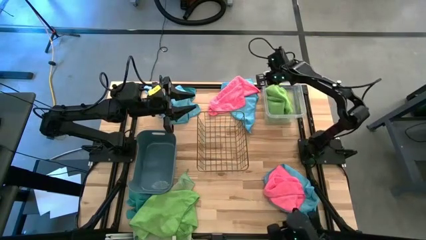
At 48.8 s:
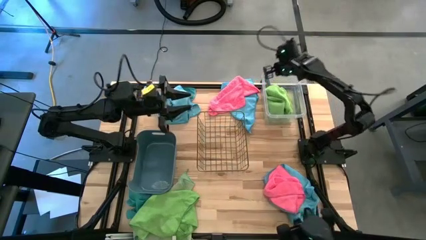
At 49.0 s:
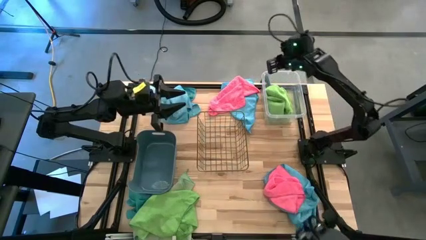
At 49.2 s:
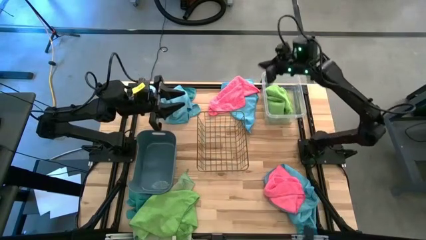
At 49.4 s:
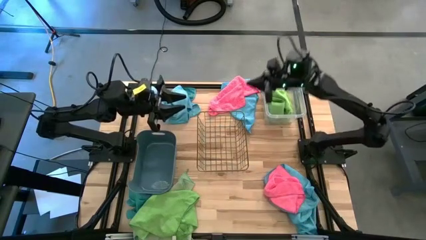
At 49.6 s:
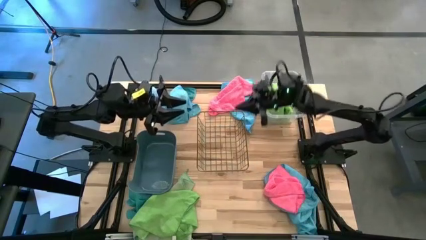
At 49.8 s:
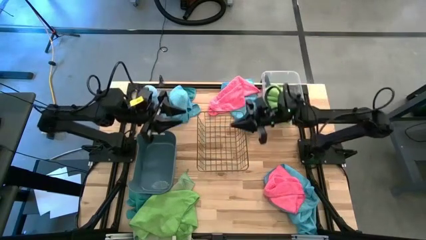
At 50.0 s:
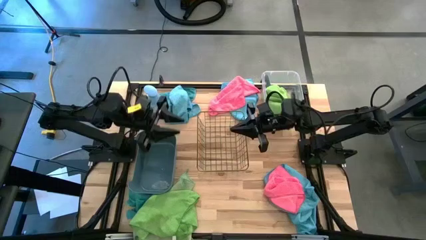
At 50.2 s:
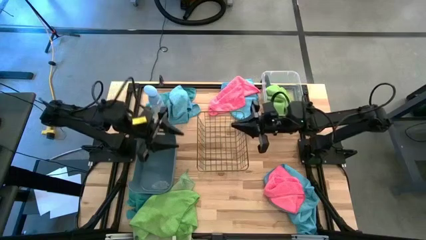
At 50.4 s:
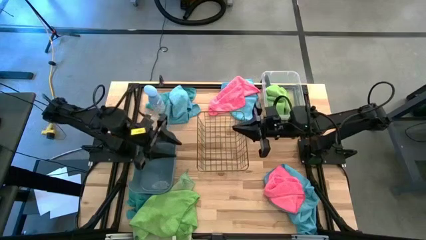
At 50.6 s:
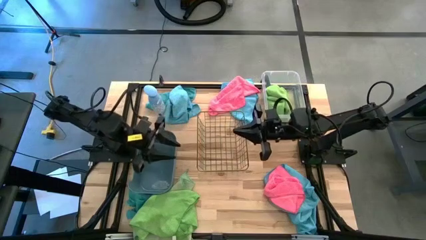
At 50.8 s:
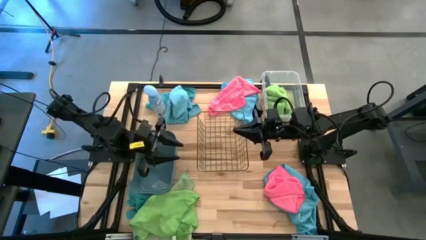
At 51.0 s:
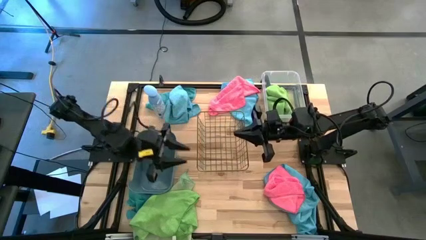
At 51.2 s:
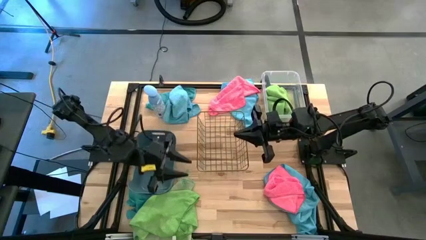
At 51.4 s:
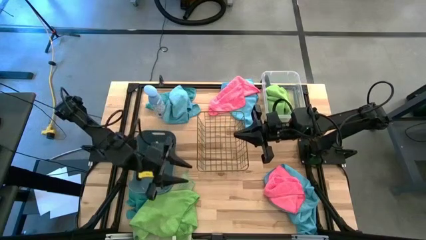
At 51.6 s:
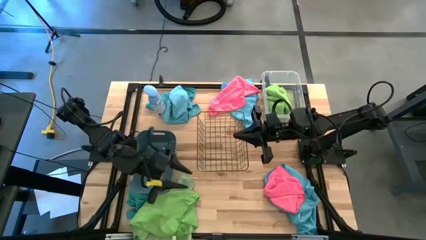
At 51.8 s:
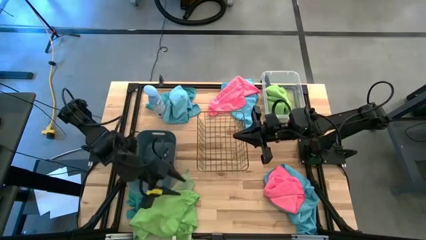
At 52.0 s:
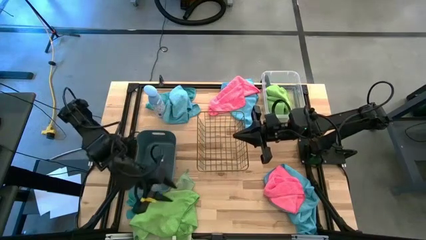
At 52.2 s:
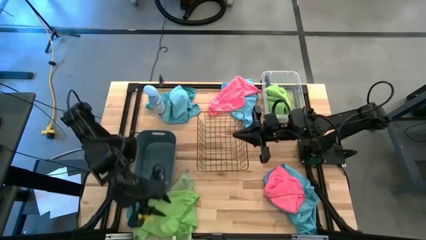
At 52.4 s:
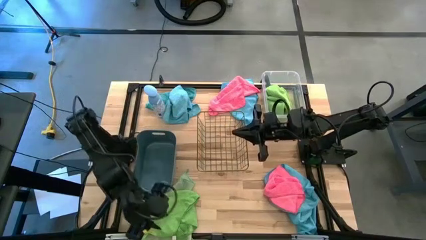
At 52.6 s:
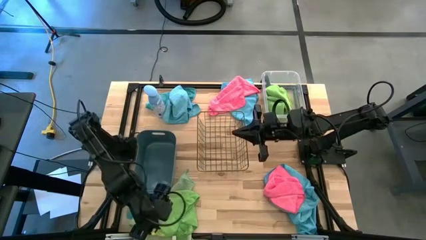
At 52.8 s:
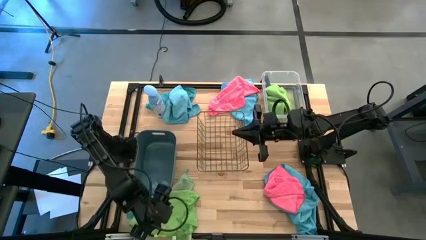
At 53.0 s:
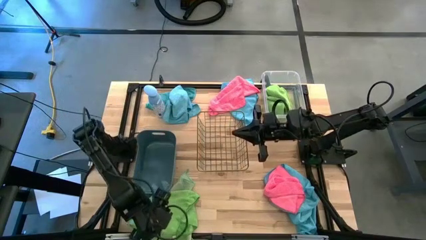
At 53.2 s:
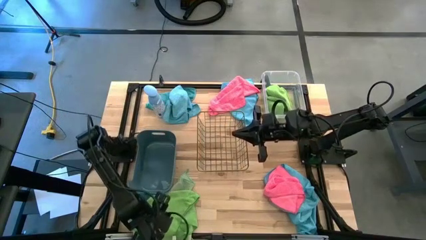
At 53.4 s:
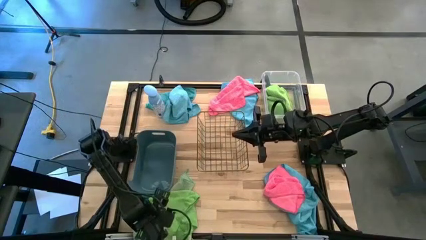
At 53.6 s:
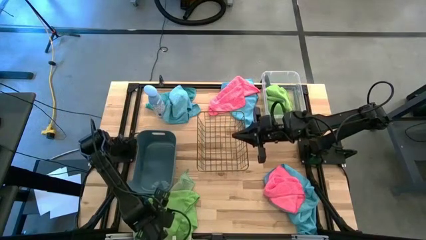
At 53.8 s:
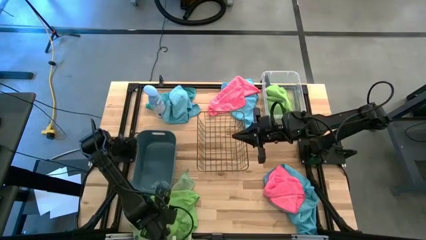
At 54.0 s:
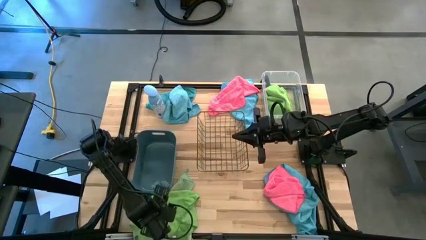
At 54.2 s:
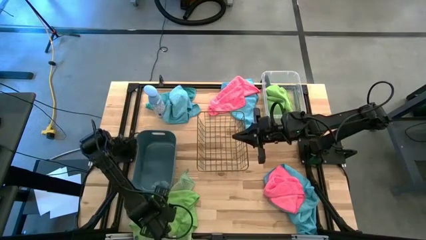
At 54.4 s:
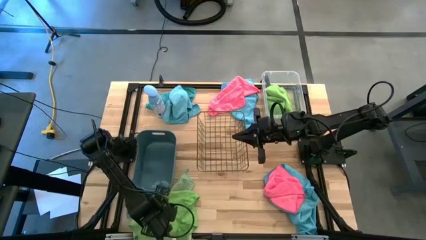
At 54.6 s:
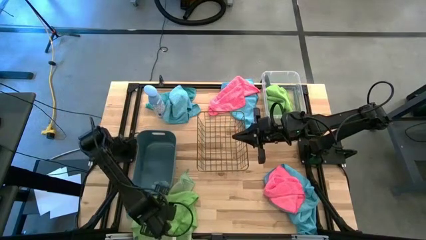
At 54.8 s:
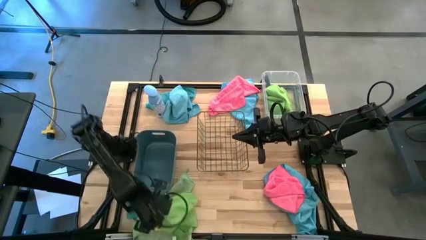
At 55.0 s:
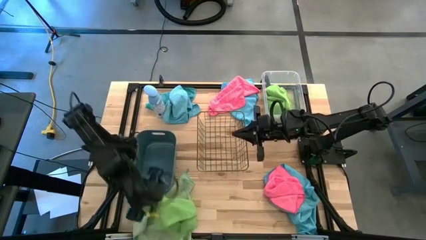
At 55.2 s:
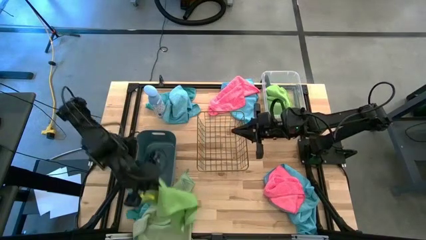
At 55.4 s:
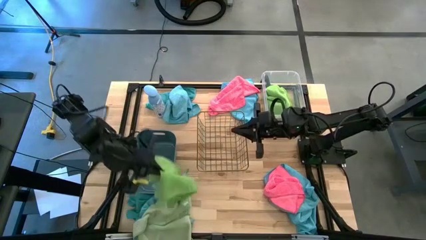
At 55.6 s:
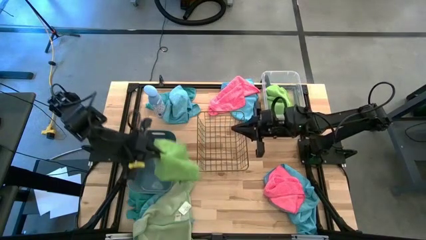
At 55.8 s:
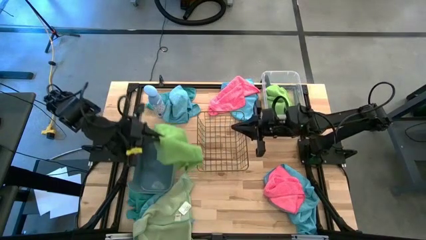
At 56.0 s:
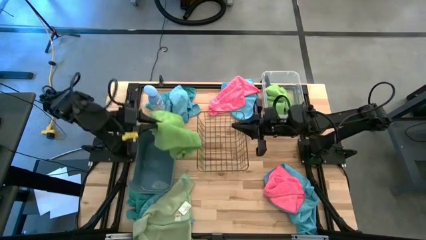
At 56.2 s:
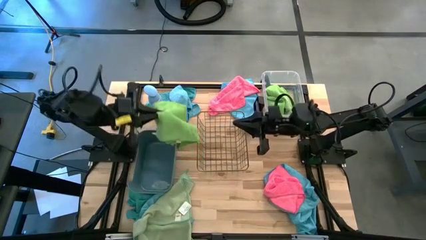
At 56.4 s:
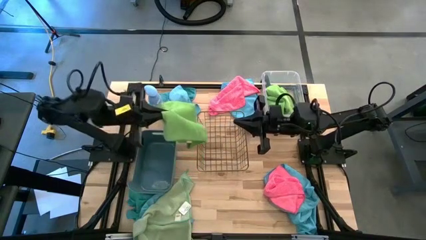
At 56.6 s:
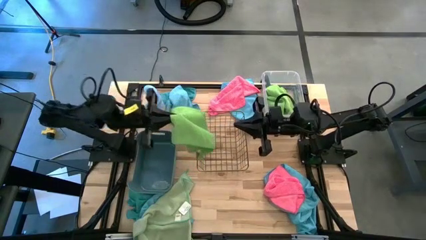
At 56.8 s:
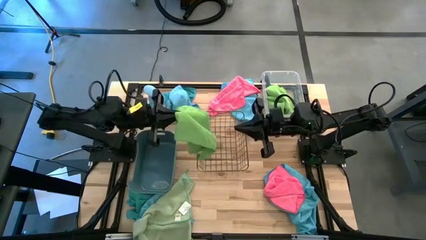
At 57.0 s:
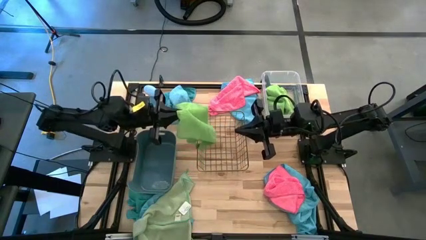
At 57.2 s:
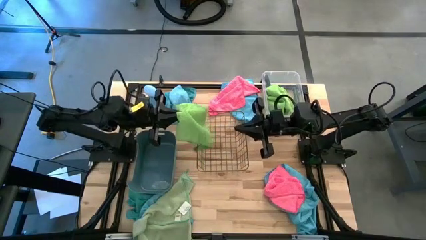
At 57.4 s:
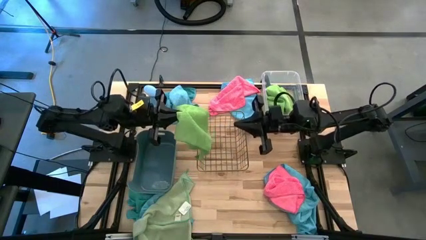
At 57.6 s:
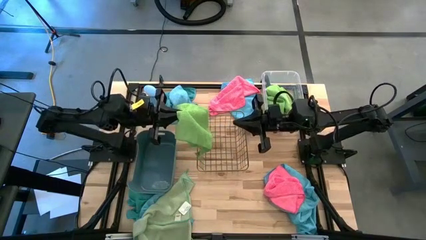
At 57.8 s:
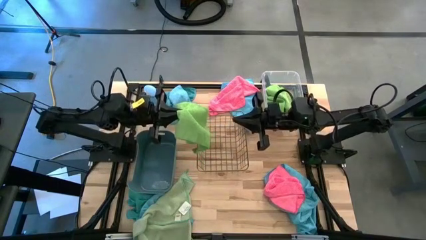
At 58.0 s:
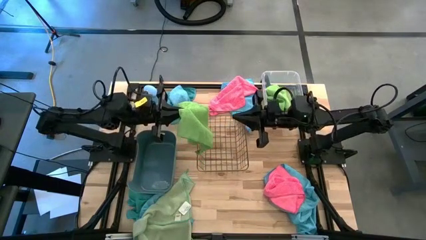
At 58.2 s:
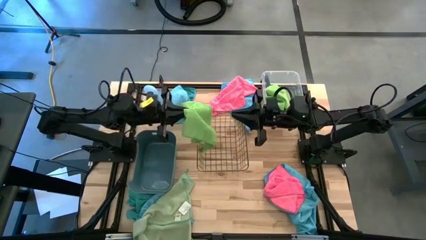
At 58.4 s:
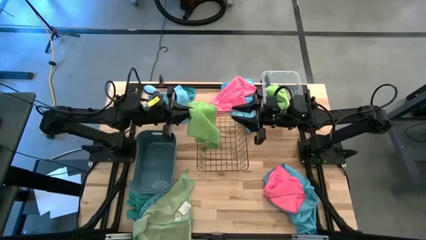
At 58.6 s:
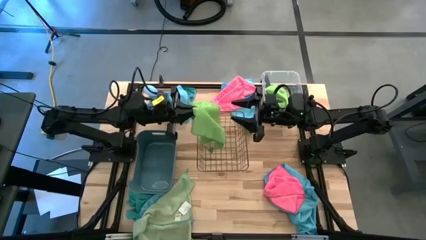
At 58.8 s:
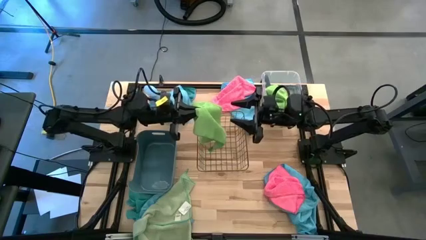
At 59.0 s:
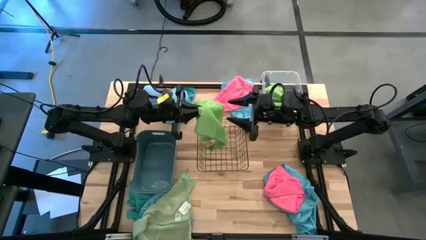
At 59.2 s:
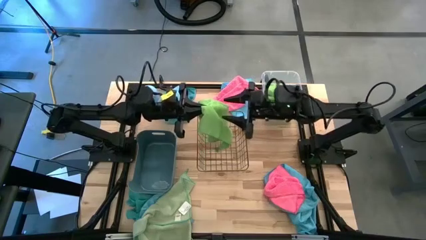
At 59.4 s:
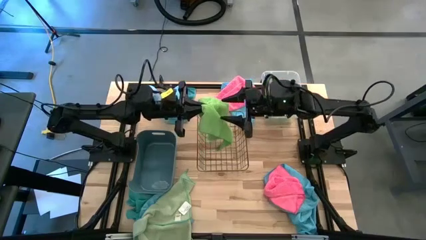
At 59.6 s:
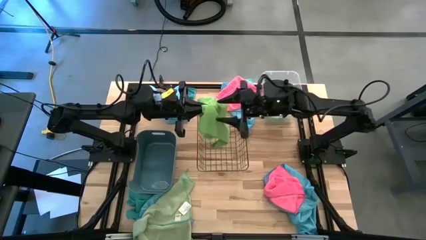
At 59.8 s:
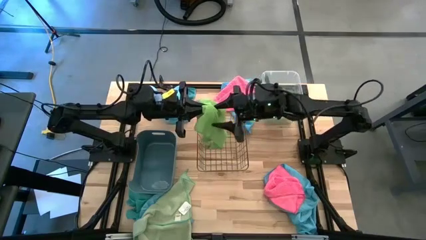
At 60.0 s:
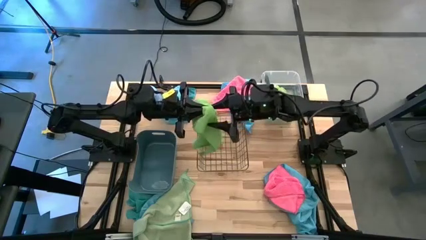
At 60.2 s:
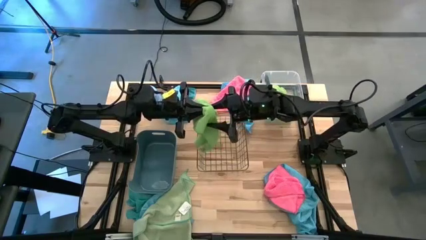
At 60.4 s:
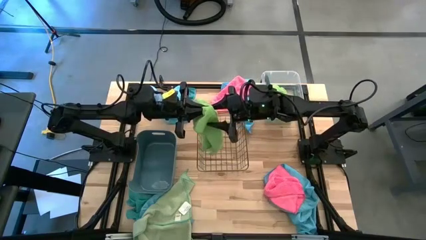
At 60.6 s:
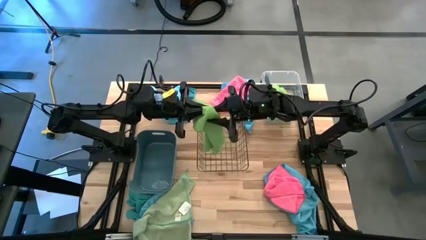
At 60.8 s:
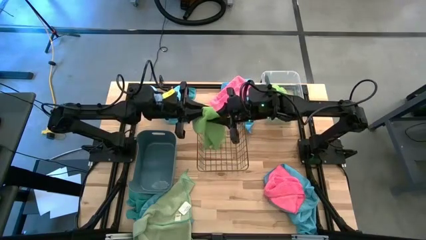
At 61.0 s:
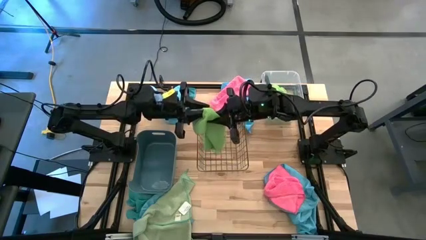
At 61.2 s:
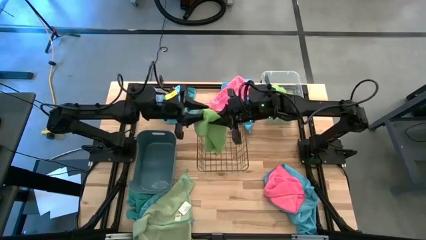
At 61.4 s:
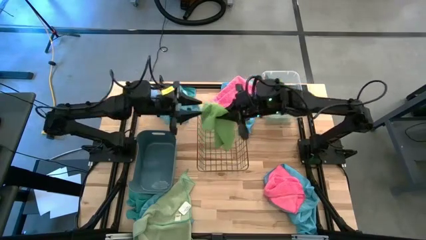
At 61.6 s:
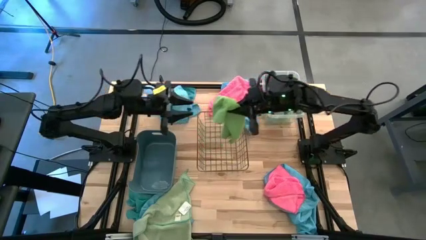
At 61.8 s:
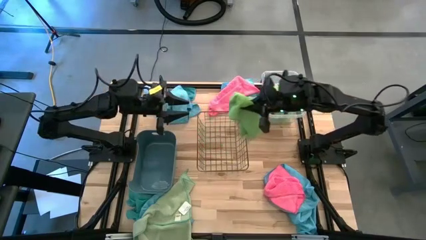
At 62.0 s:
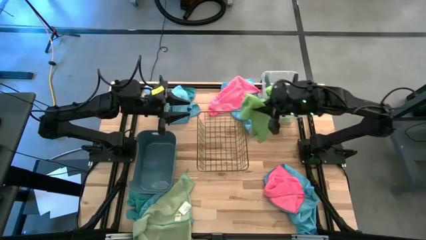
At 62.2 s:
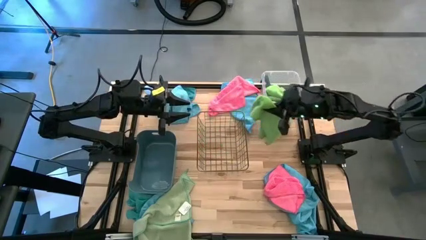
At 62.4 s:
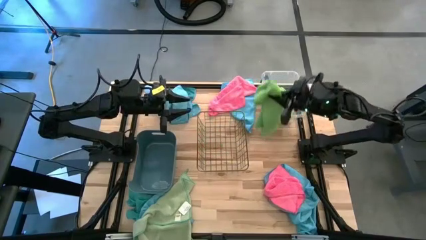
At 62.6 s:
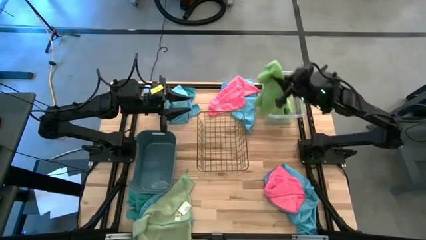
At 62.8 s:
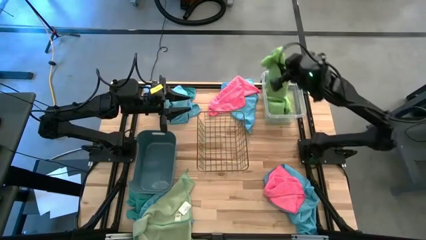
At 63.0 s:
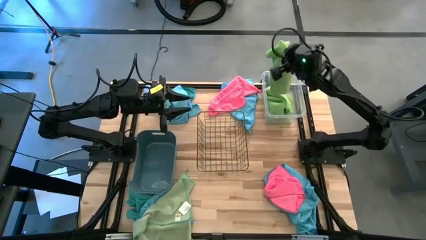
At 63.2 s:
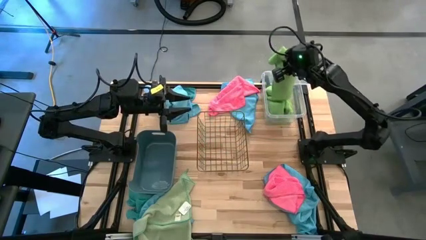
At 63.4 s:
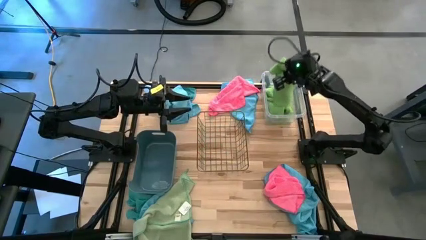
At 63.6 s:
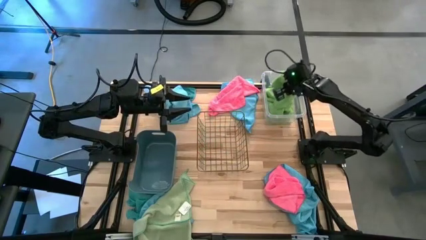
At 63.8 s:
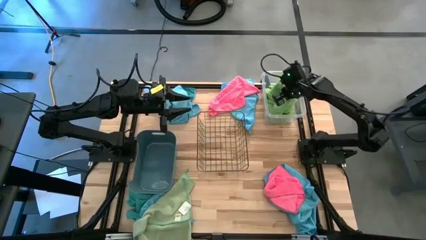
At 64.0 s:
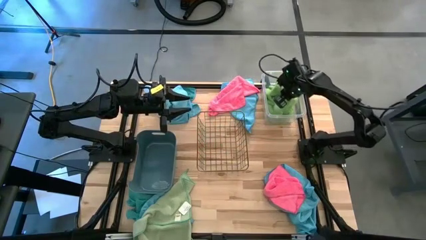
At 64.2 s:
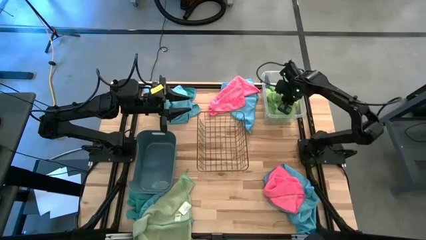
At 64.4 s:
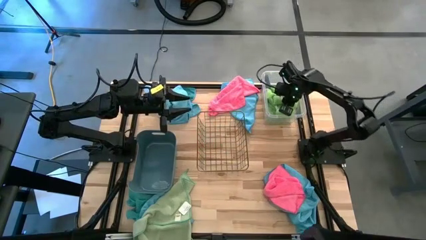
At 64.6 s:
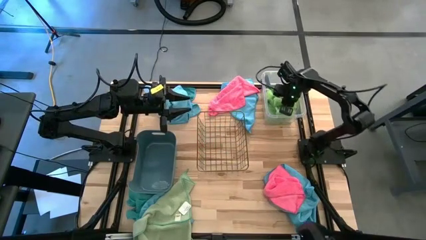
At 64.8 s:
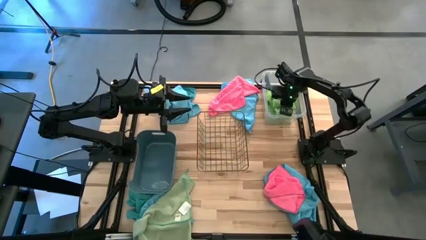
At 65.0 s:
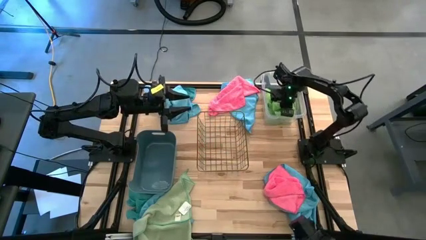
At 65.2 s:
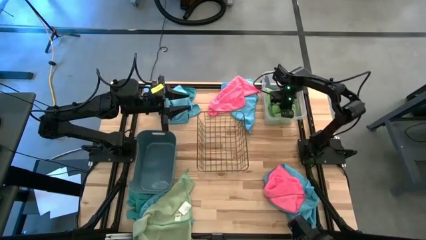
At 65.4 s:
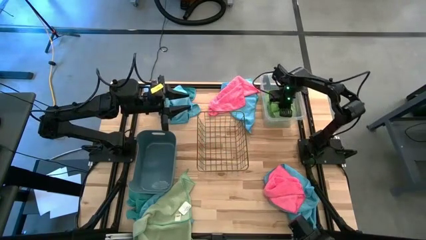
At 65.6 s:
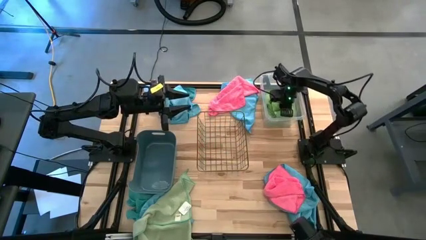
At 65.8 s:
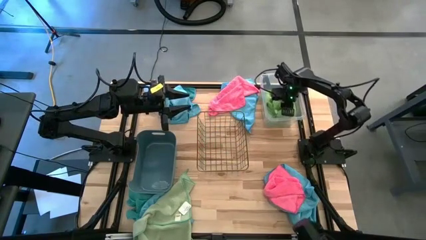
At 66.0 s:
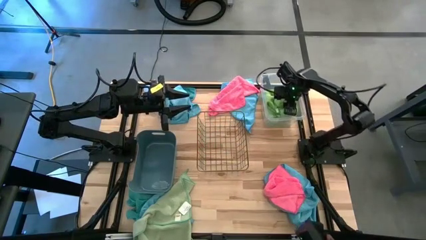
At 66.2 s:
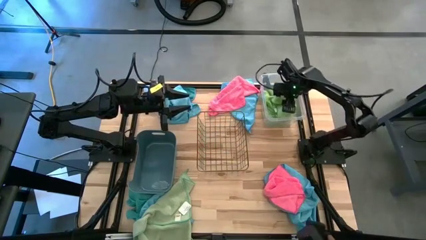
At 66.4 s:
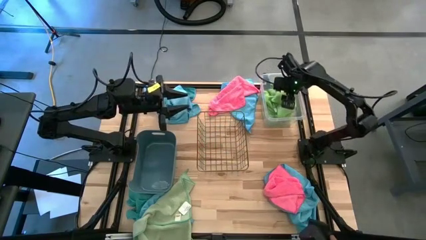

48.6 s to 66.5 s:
Task: Sort microfiber towel by color & place in baskets
Put the green towel into the transparent bin
